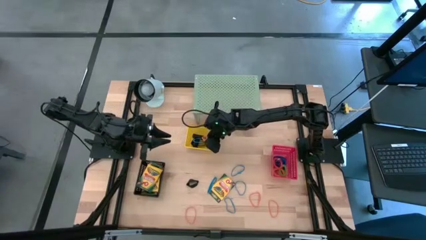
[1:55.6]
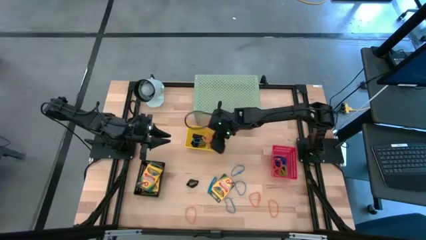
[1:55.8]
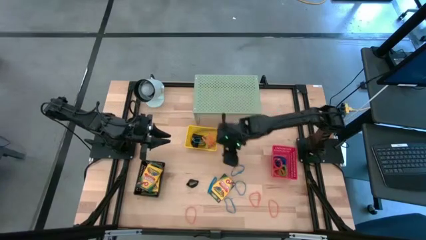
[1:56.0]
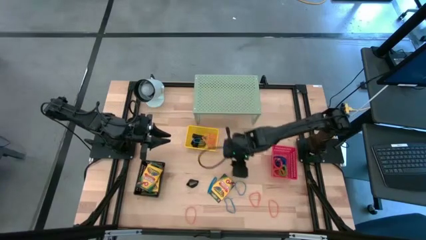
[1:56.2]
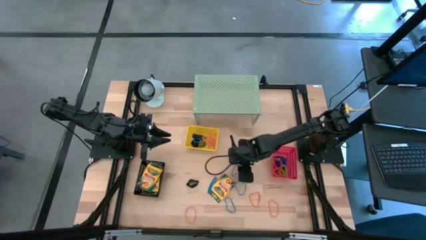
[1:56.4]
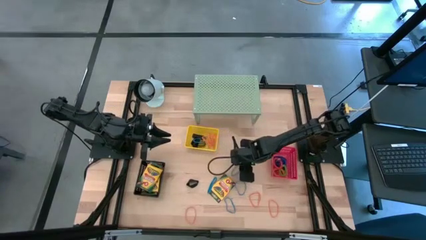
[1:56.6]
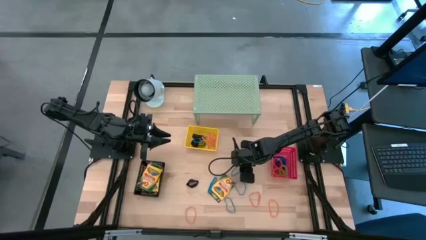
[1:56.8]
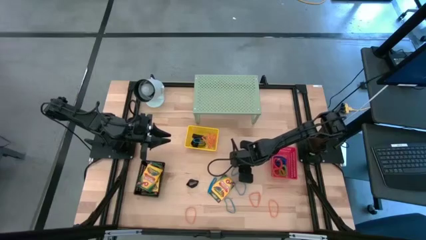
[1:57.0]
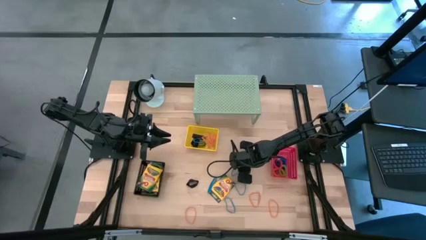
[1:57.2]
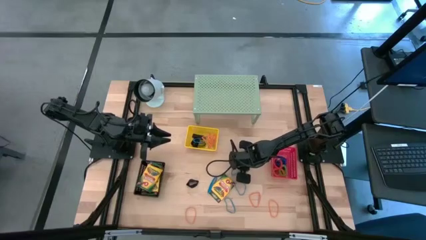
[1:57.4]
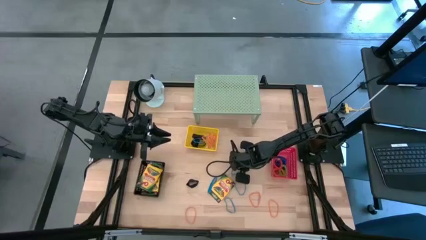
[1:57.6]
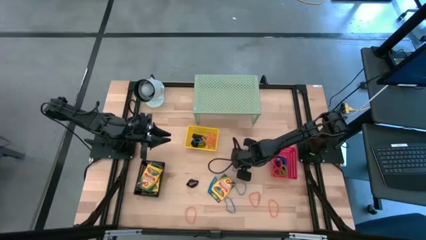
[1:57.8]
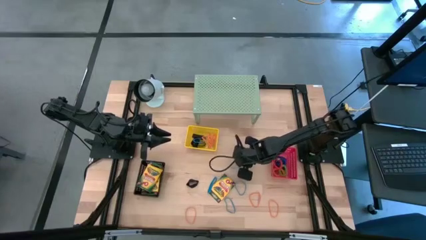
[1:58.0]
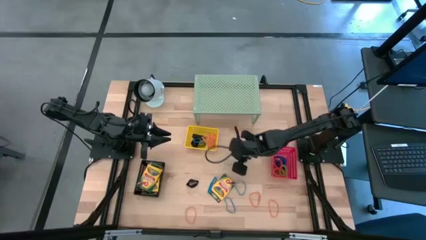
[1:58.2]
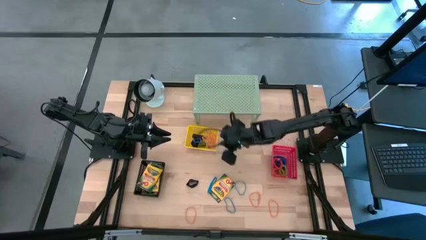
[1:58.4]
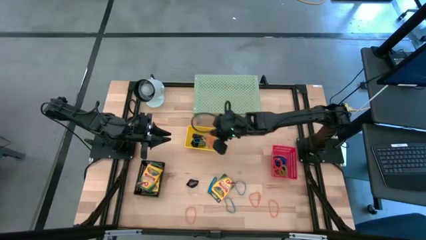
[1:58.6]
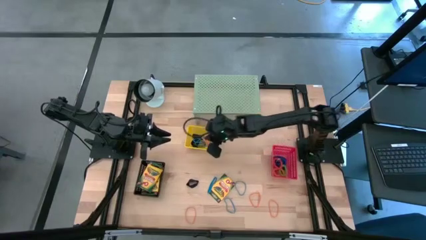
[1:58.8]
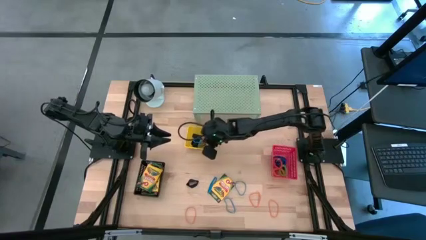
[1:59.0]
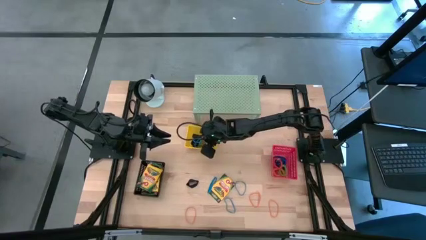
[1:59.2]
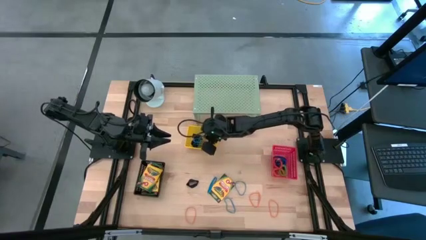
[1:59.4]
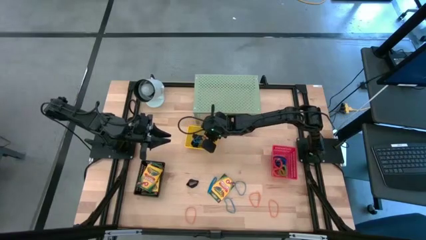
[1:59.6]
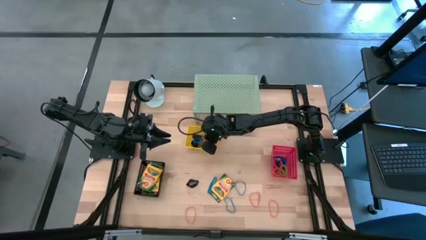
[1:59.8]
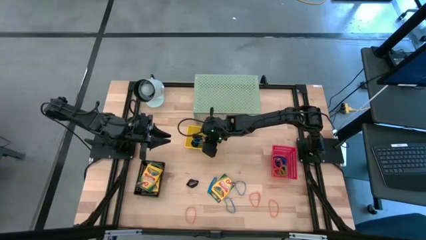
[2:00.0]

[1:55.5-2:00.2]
Task: Pick & Place Office Desk Supplies
Put the blue rubber band into the yellow bin

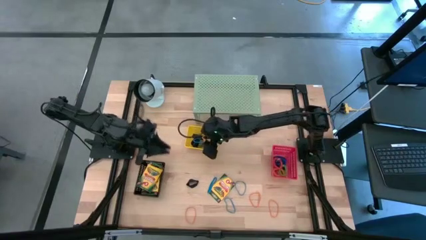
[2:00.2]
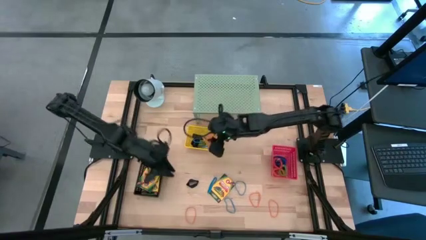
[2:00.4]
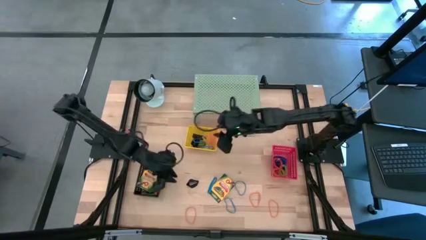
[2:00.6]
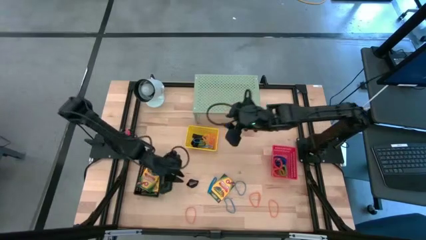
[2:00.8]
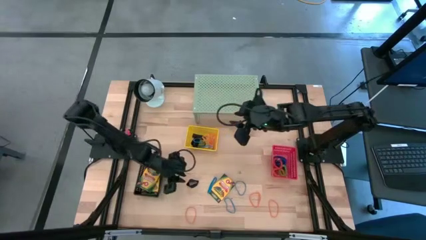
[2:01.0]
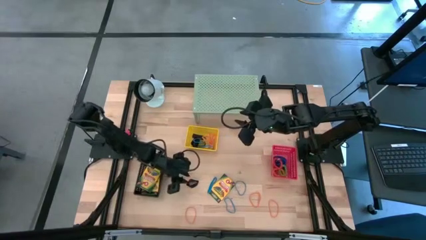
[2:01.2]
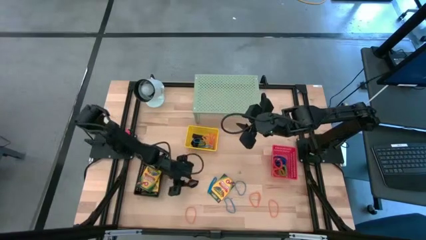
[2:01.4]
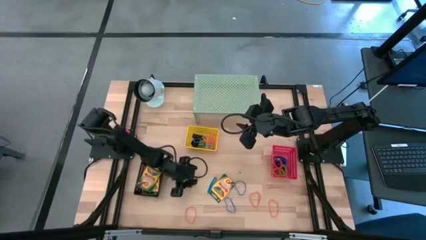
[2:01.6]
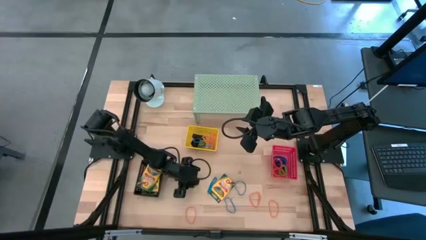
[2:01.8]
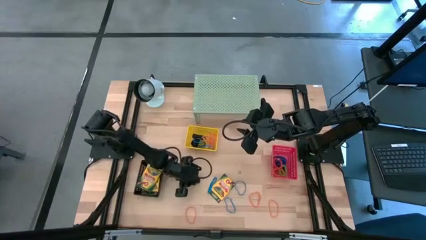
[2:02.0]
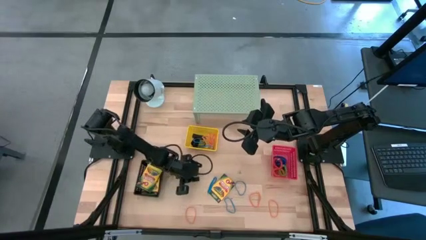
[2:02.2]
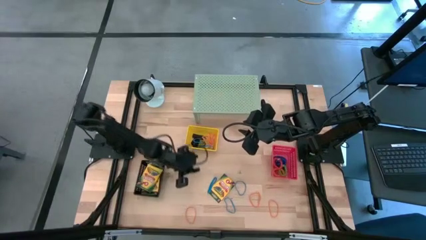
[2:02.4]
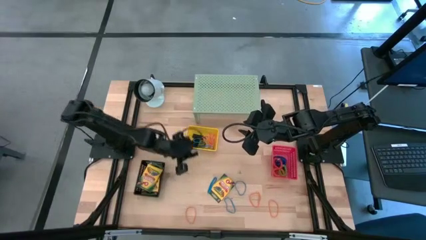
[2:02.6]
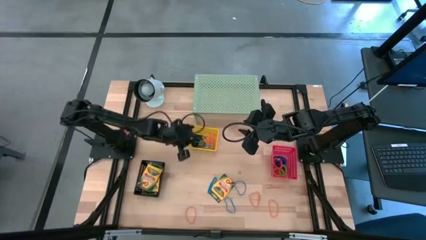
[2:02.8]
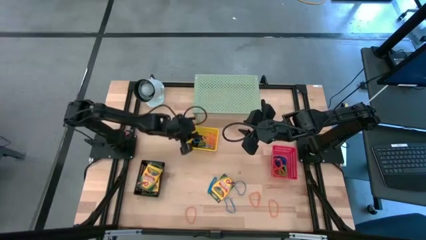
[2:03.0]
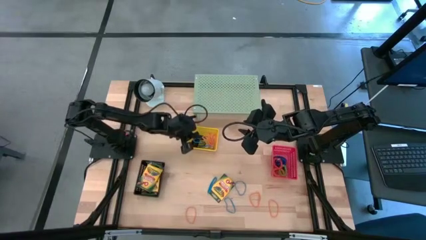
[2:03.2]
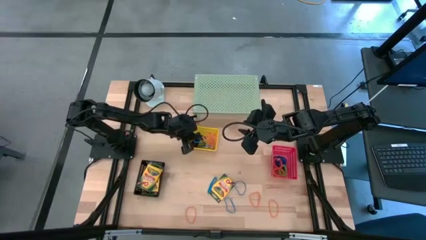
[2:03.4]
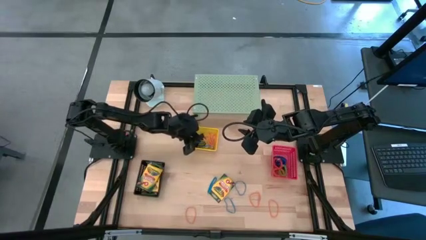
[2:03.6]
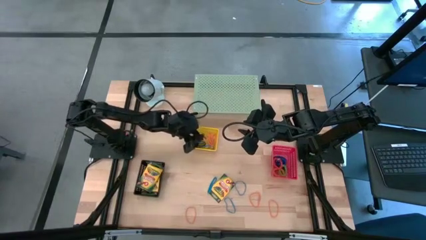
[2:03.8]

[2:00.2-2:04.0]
Put the black rubber band into the yellow bin

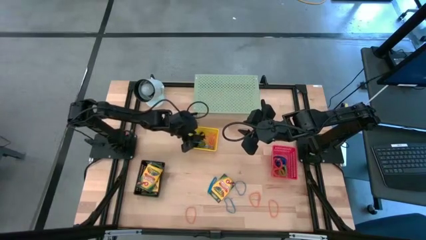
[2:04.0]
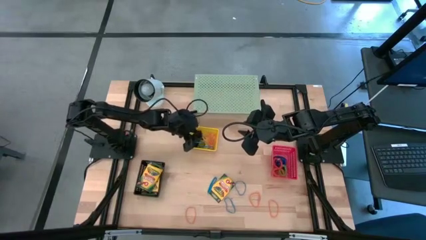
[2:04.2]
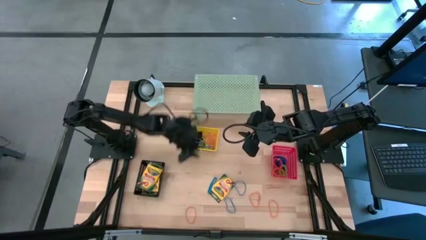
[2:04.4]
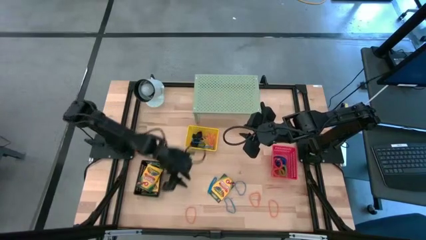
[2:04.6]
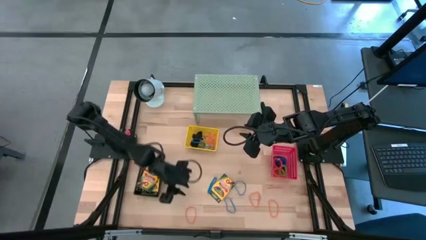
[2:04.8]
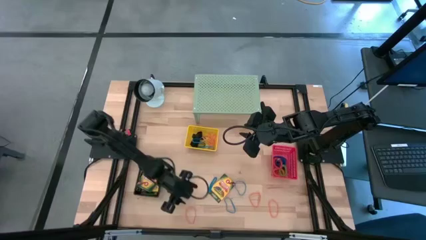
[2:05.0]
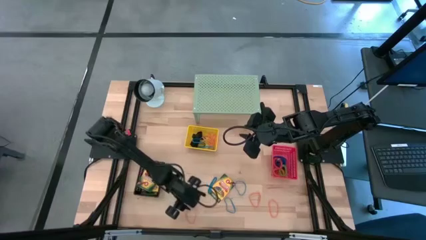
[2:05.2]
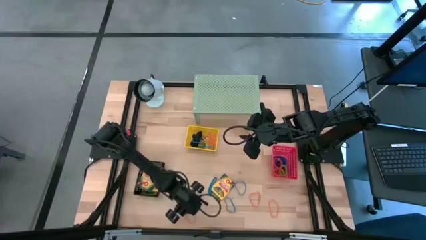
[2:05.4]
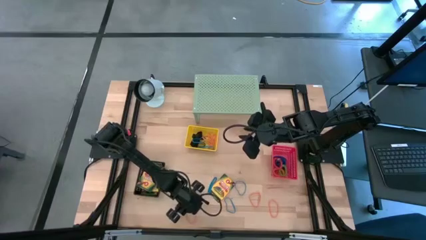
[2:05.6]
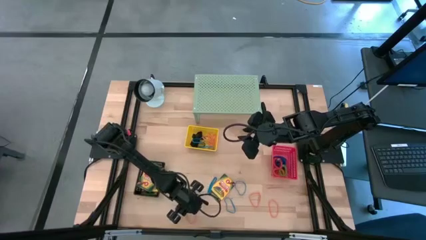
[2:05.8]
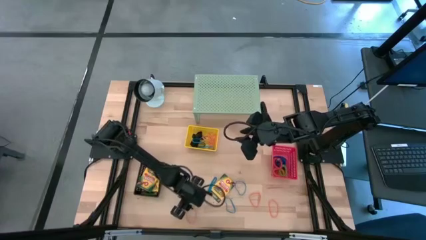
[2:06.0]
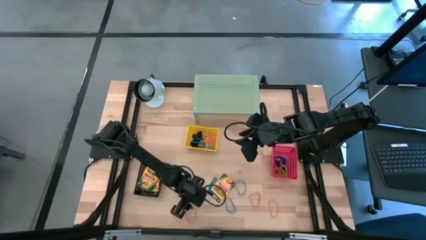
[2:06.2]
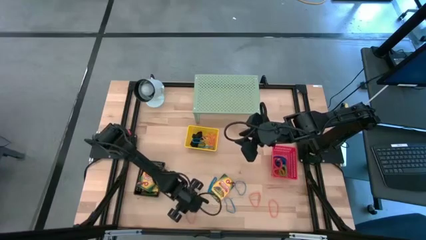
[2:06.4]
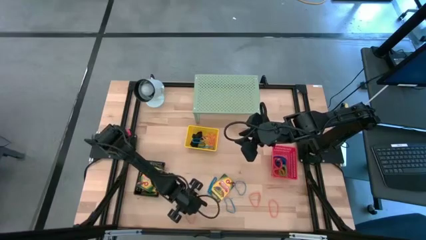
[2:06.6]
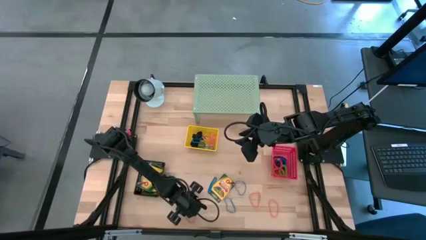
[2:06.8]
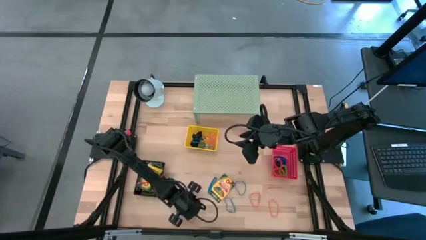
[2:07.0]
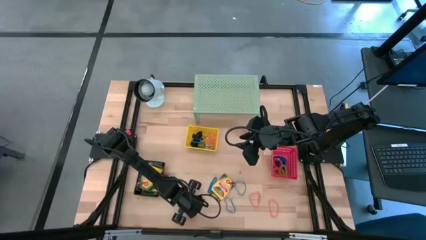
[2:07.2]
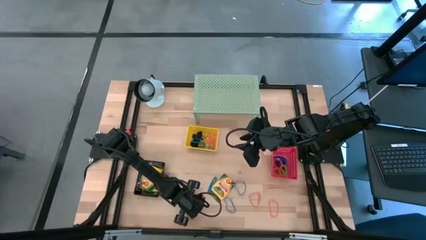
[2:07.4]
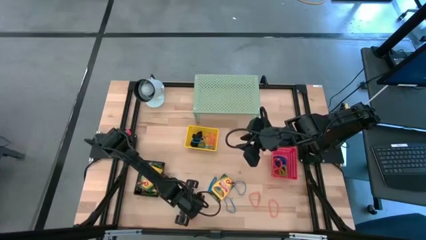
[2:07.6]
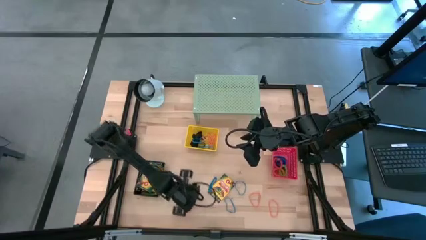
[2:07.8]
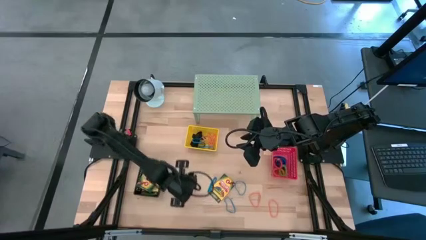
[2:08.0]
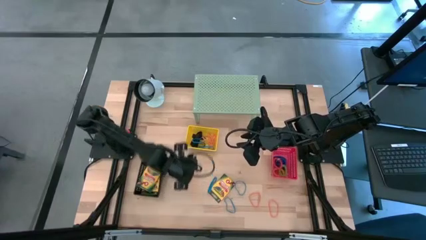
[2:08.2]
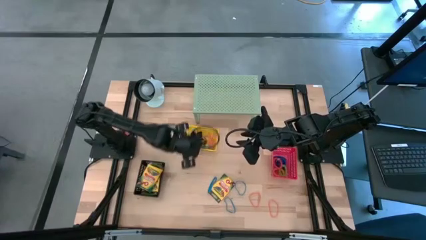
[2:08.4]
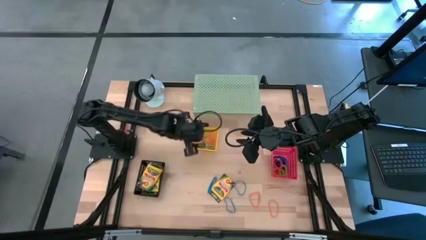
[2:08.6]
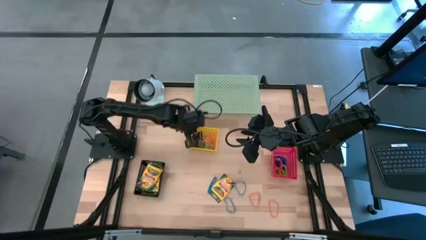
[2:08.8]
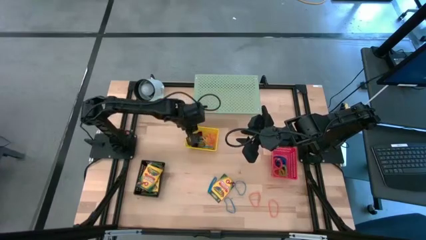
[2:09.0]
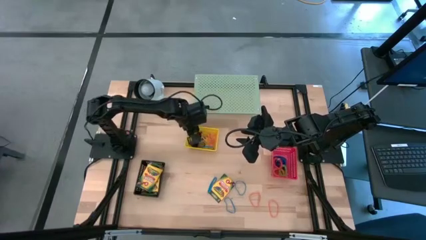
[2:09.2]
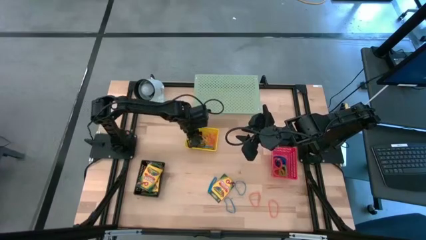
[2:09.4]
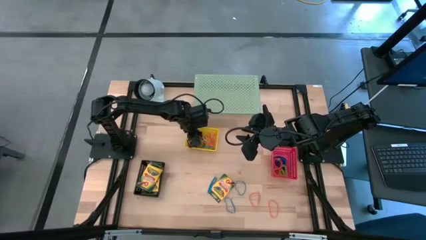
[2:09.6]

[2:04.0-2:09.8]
Put the orange rubber band into the yellow bin

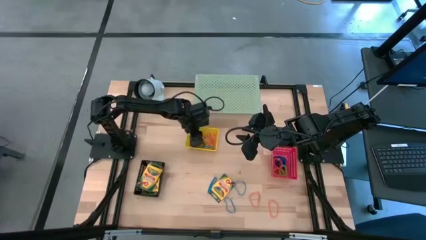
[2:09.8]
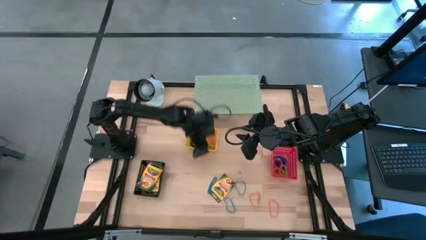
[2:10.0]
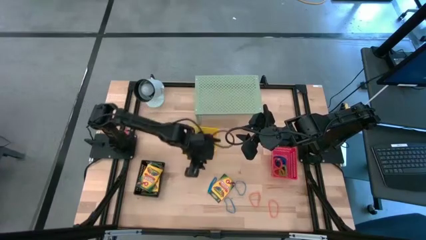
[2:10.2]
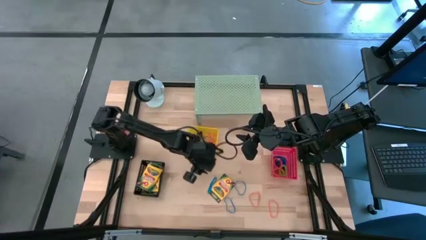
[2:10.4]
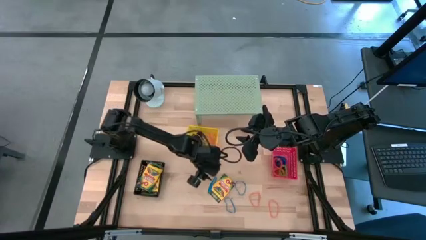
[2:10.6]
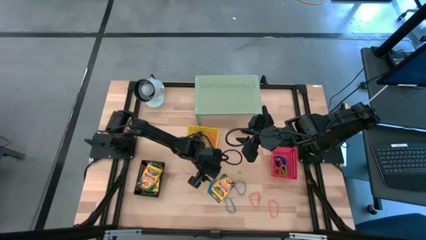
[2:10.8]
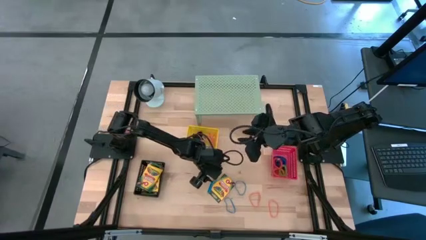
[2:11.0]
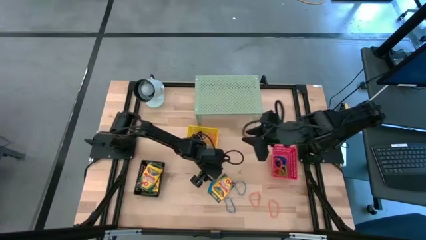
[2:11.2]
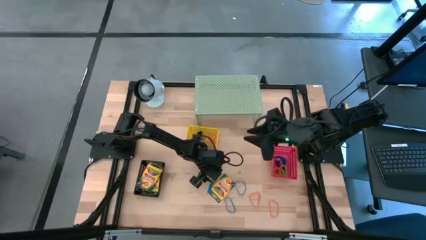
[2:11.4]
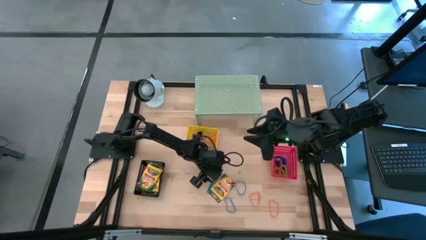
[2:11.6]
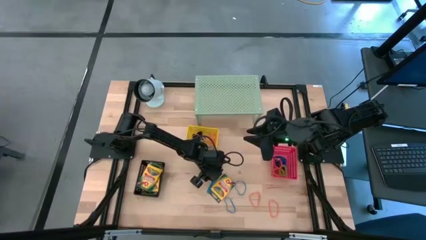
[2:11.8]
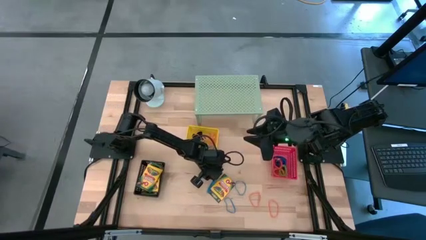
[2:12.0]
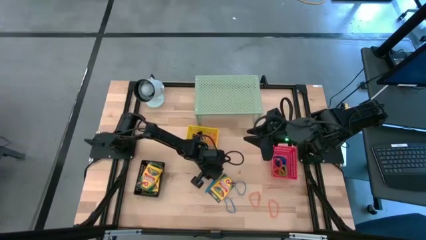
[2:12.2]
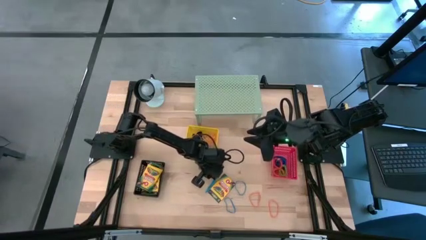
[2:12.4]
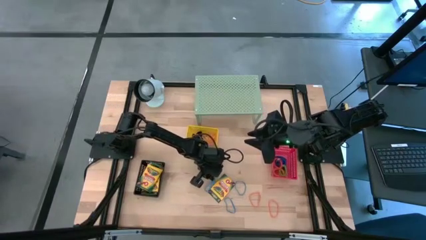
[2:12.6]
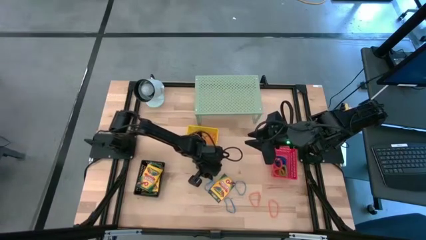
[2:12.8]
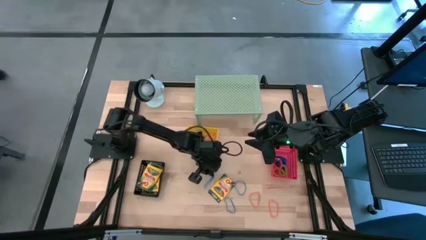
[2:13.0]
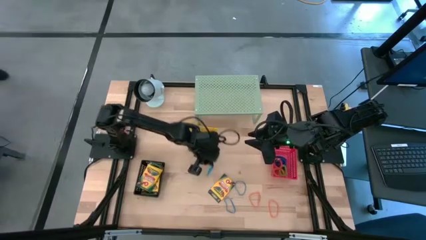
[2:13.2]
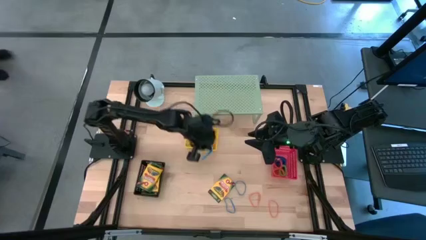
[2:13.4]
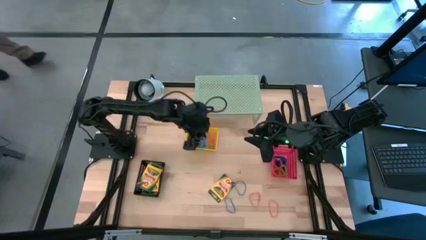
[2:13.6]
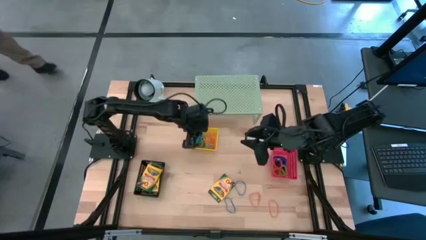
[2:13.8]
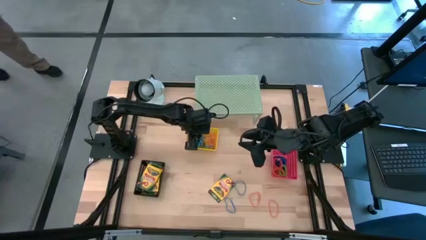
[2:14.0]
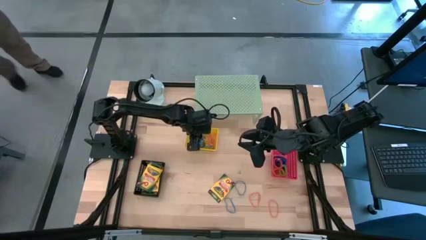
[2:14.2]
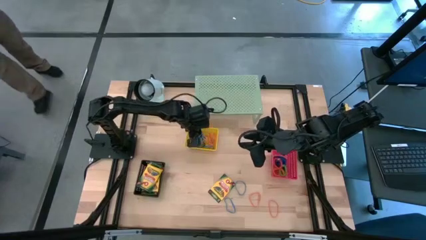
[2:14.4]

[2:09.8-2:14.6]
Put the blue rubber band into the yellow bin
